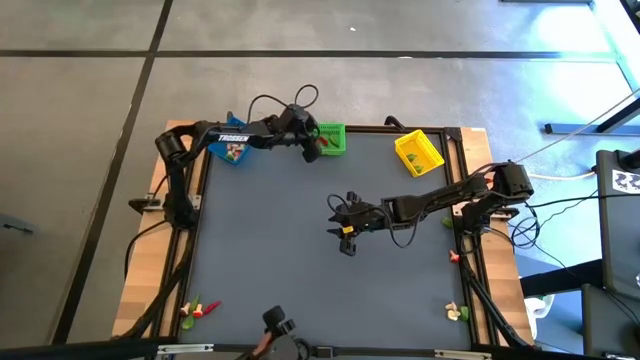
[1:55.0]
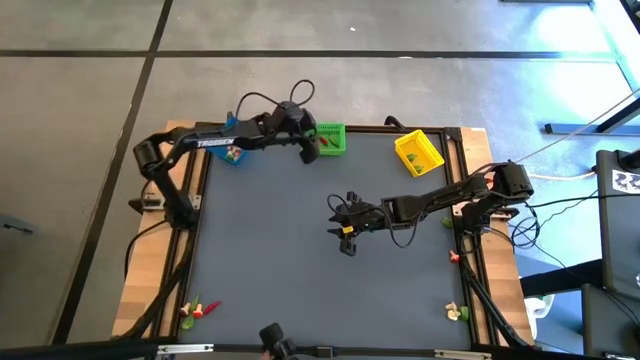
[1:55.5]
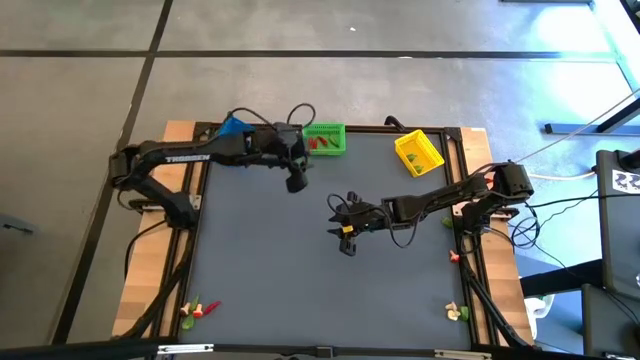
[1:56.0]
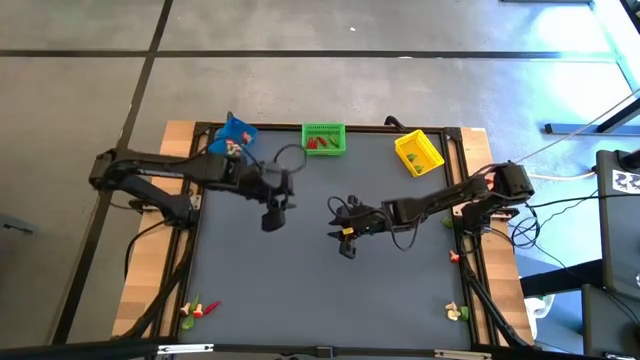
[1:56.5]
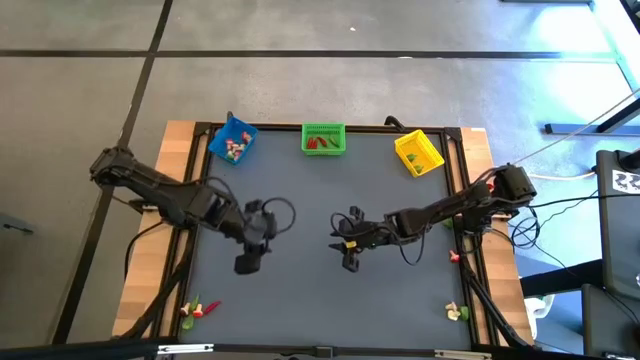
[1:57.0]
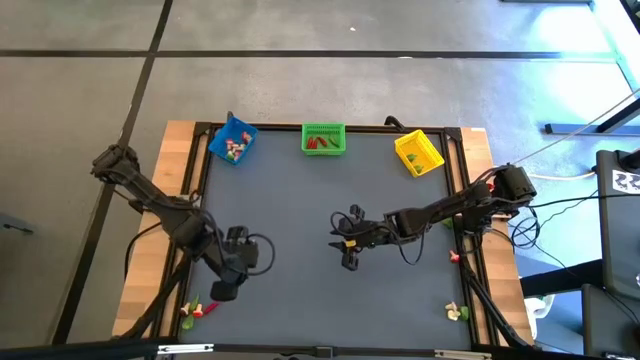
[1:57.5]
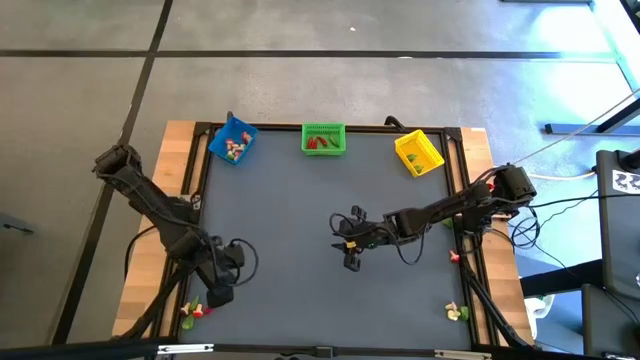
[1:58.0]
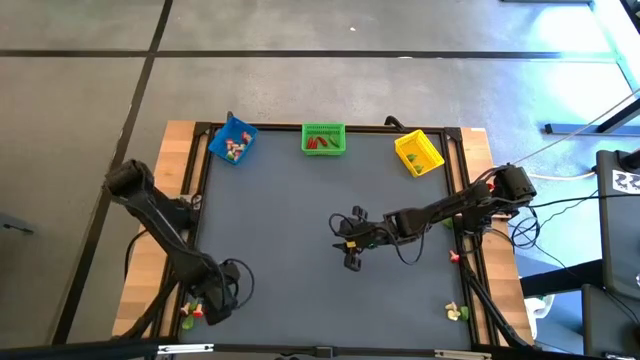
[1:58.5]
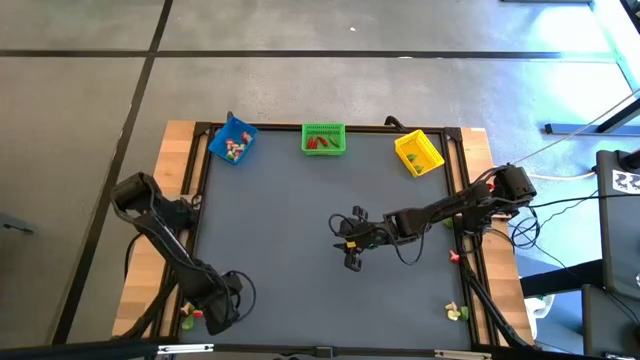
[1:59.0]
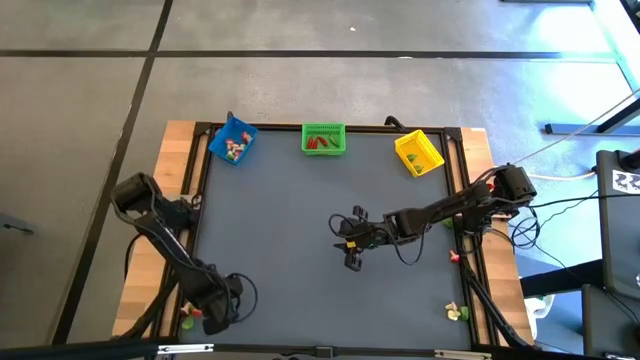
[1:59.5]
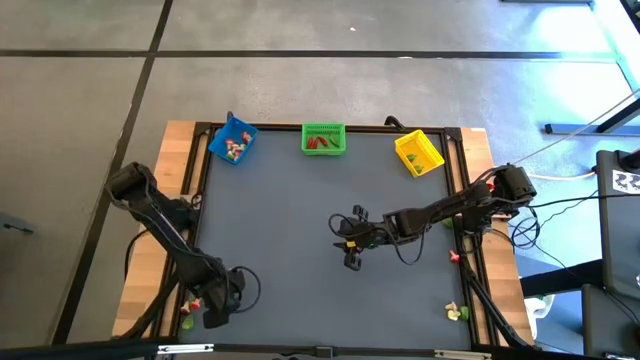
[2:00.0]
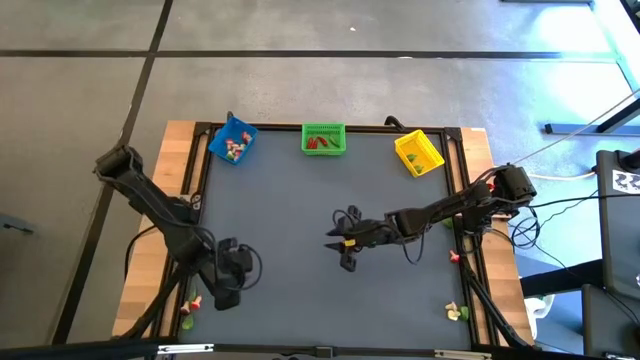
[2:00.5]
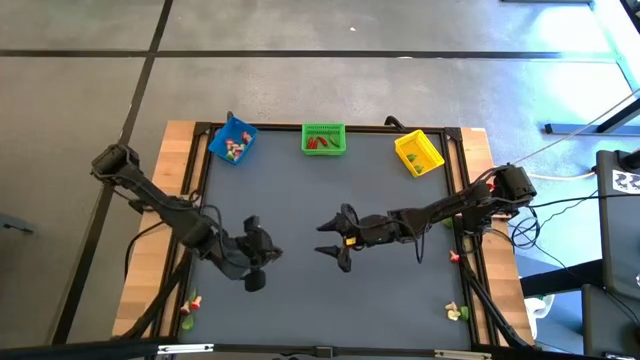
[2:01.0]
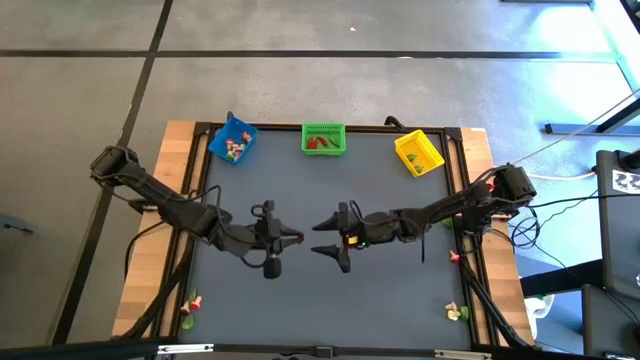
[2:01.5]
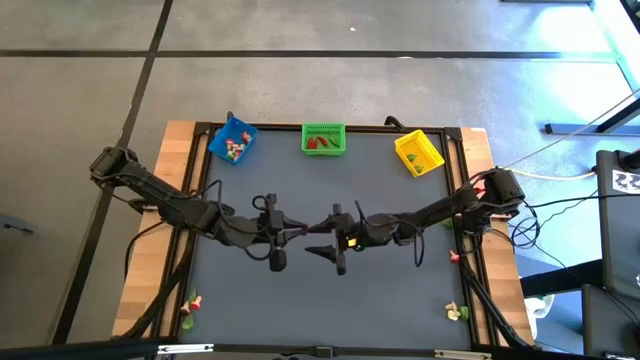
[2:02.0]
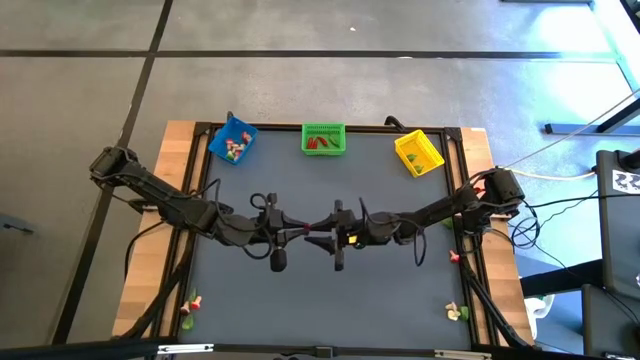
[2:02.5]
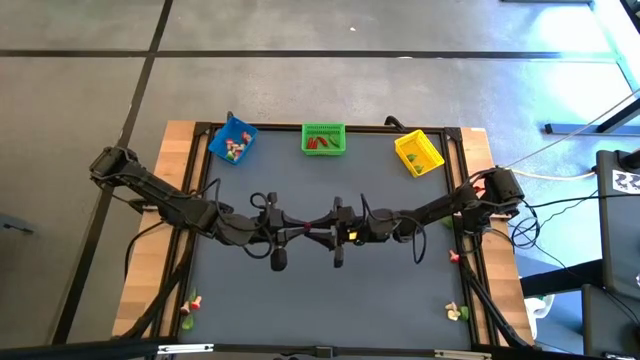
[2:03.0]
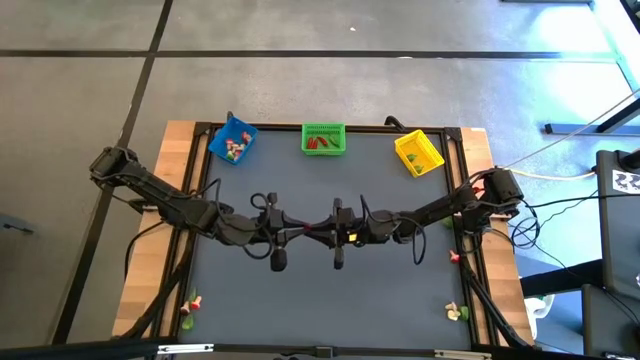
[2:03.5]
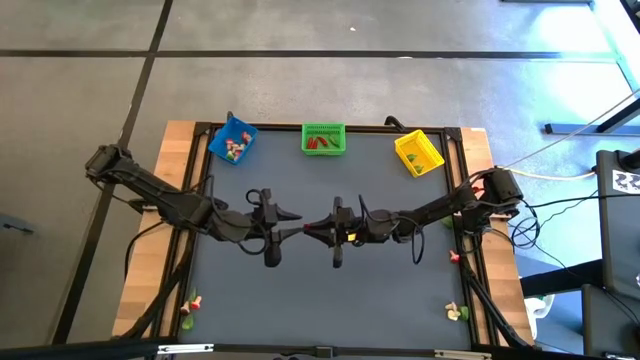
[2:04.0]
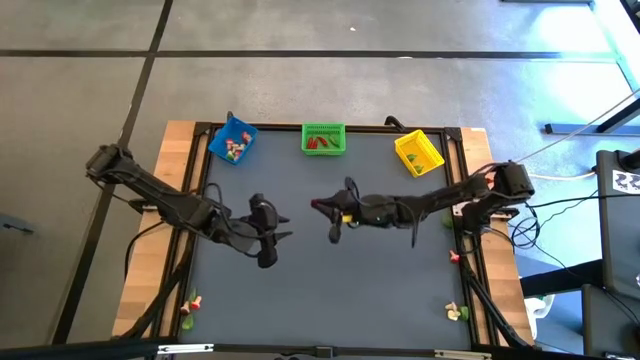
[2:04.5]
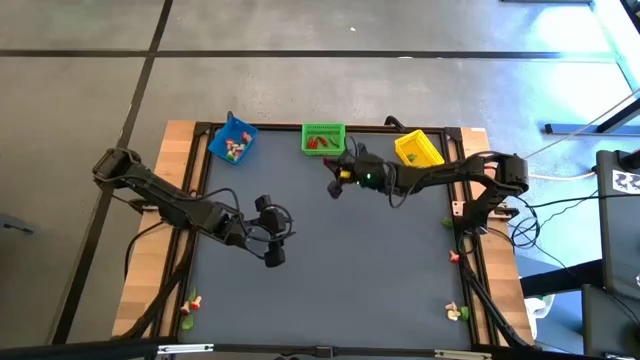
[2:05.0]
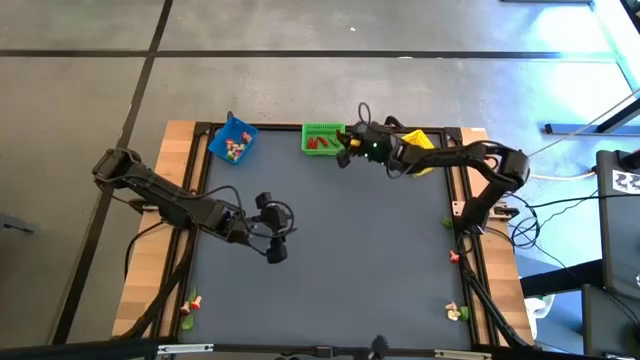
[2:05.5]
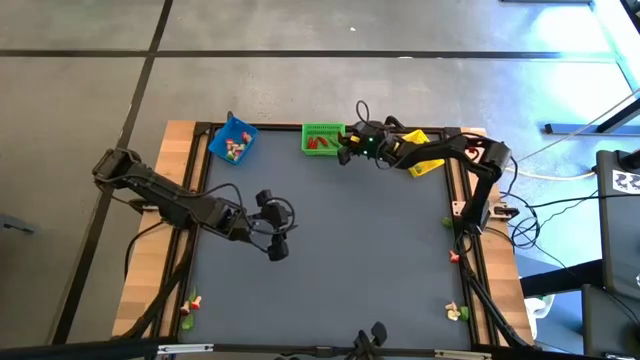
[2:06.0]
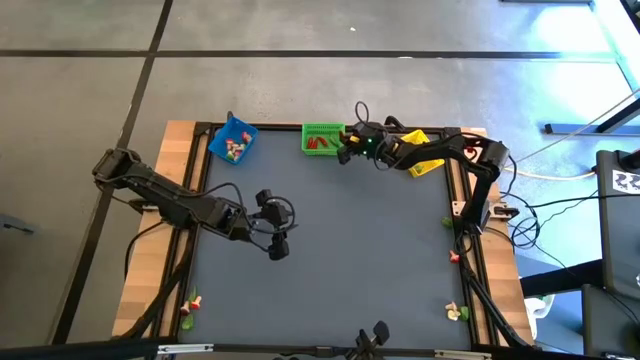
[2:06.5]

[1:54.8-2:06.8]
Task: Sort produce into baskets
Put the red chili pepper into the green bin

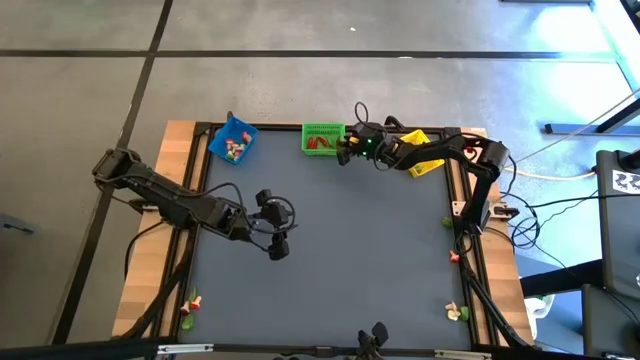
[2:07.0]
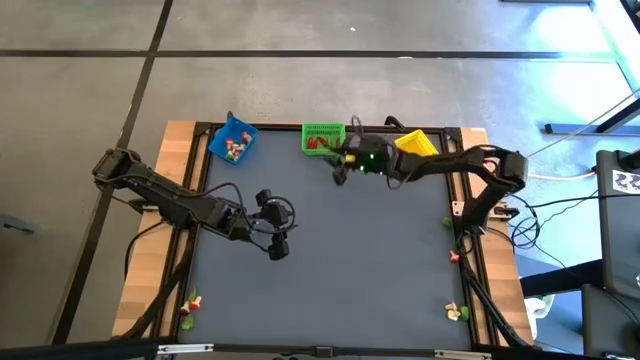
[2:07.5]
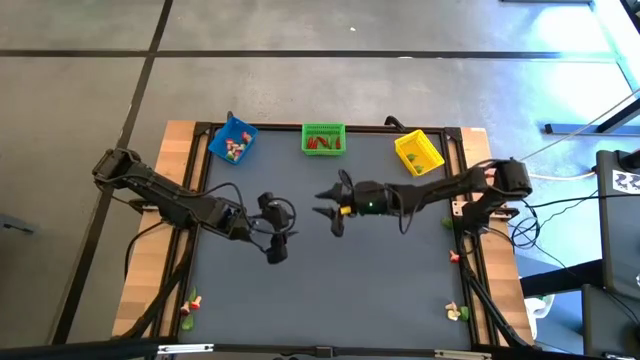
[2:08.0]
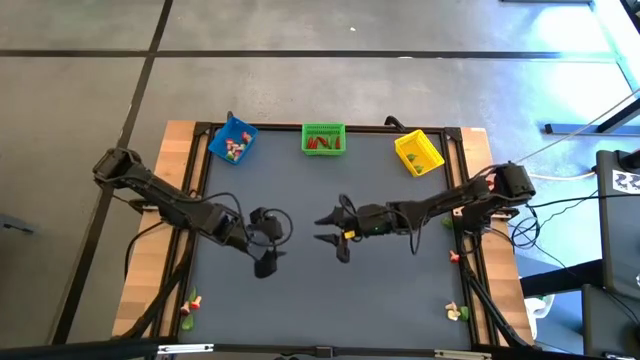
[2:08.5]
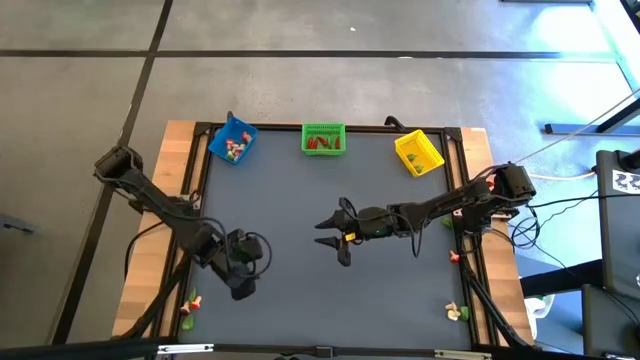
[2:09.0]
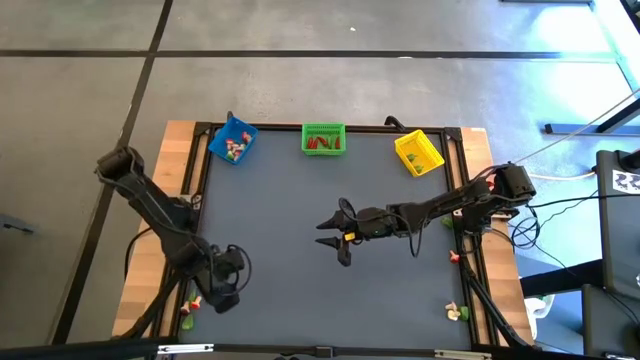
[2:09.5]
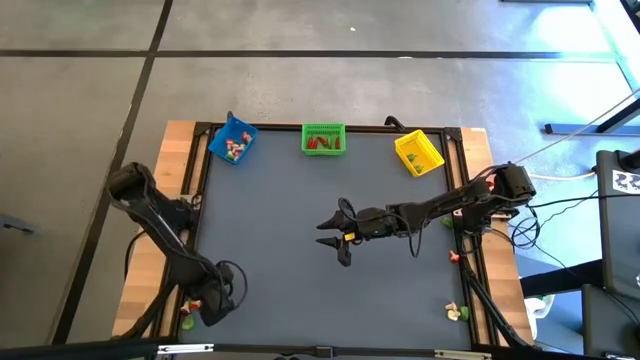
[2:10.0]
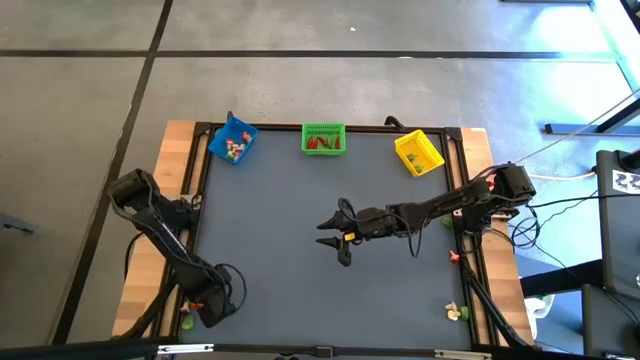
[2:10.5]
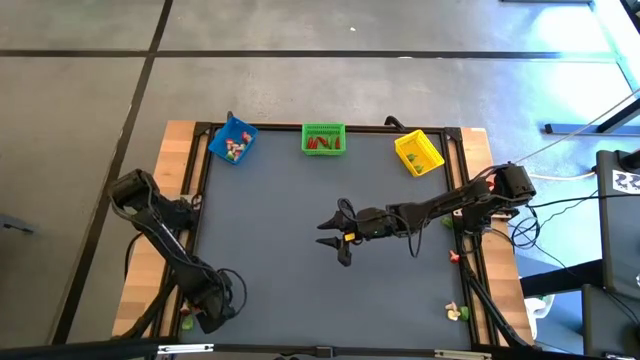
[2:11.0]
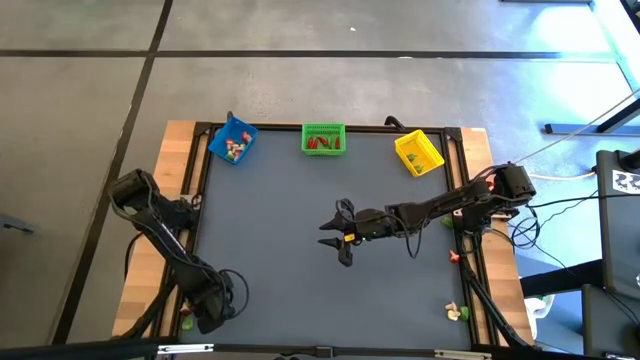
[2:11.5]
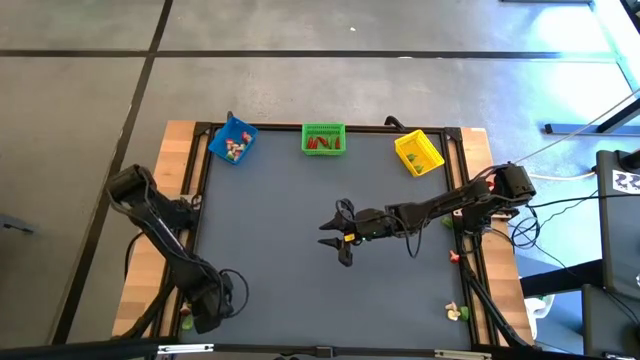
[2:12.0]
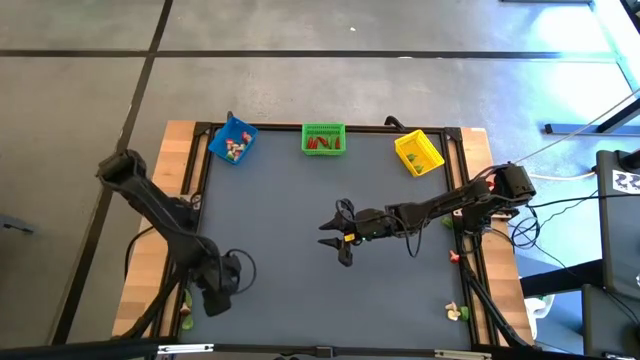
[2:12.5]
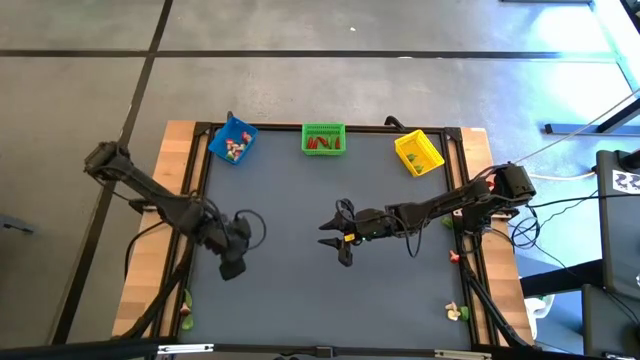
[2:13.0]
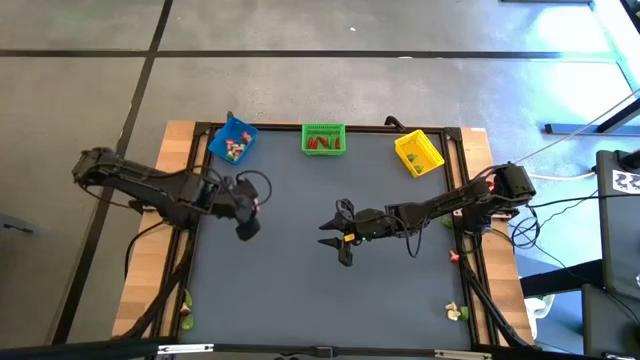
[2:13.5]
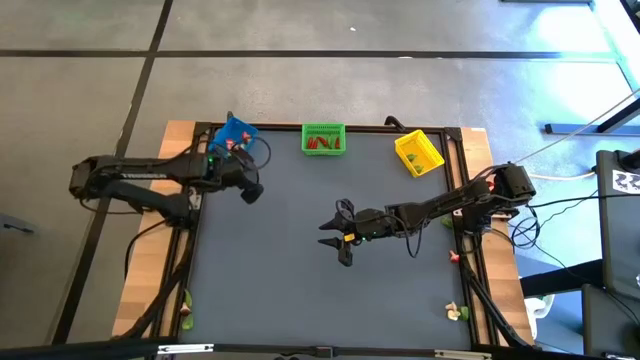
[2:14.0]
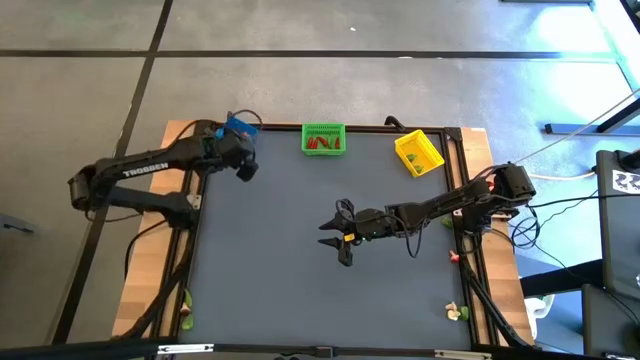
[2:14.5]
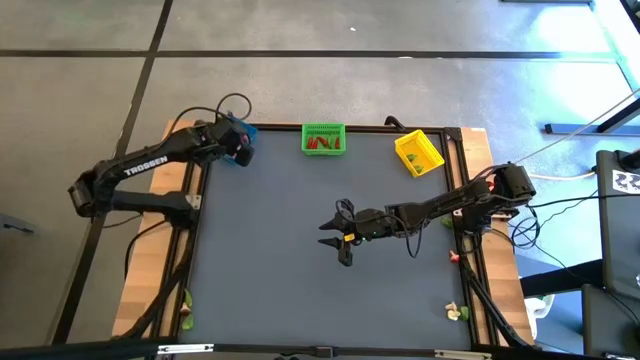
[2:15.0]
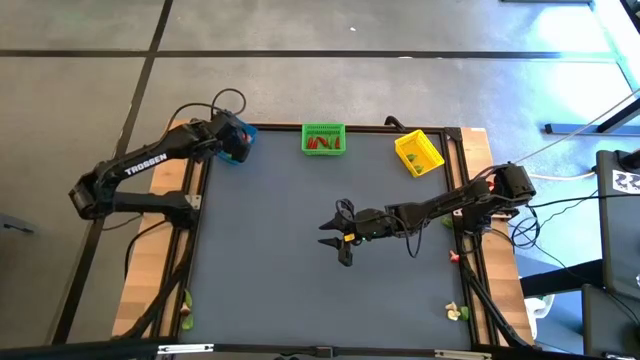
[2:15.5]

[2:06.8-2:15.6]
Put the red mushroom into the blue bin
